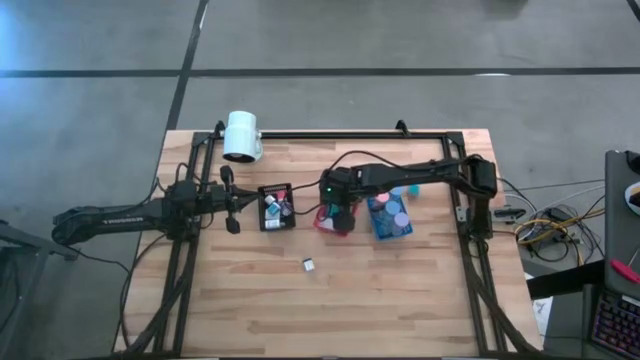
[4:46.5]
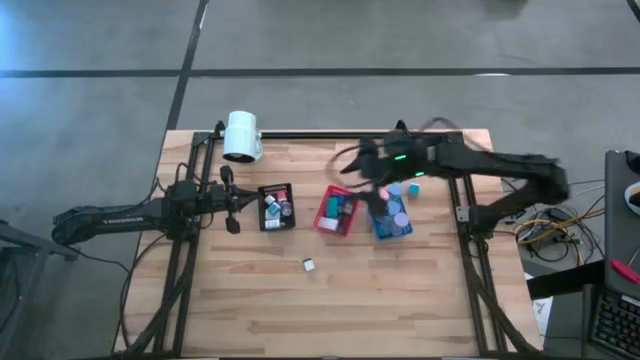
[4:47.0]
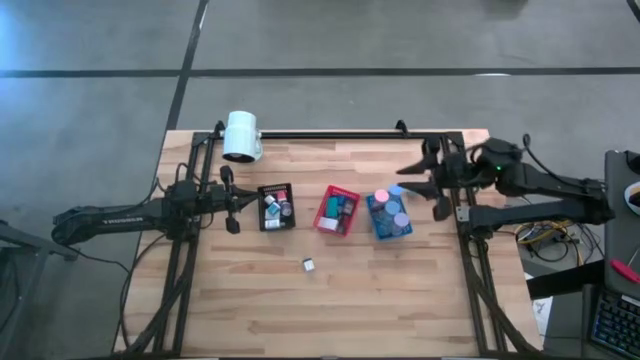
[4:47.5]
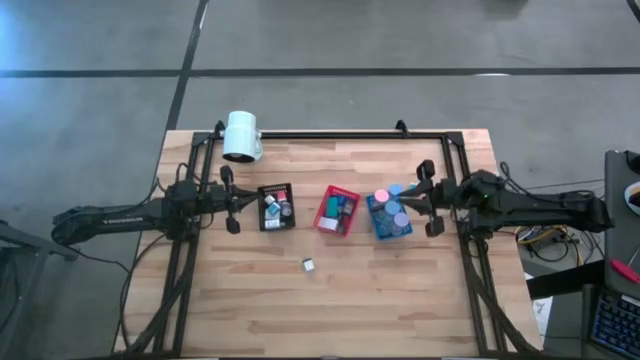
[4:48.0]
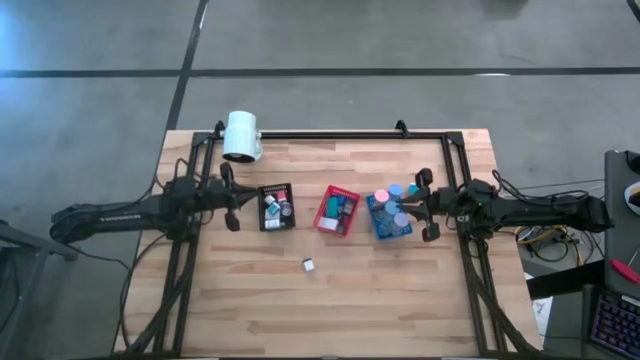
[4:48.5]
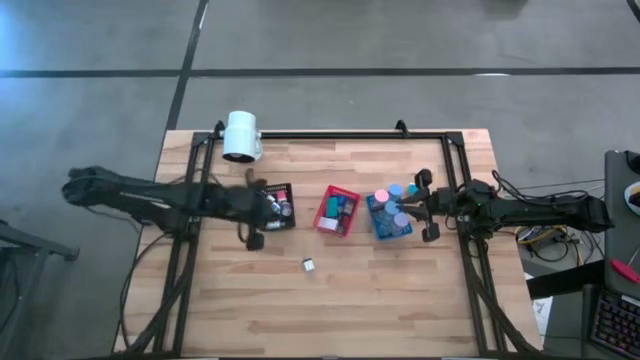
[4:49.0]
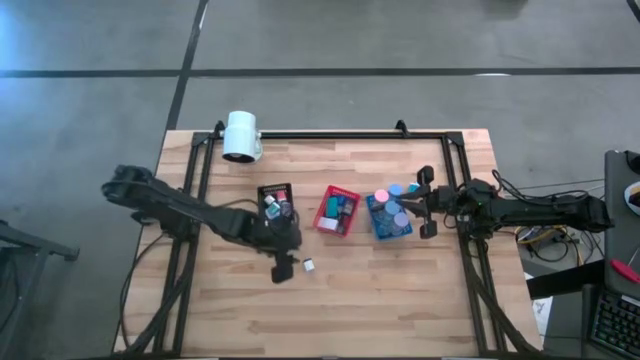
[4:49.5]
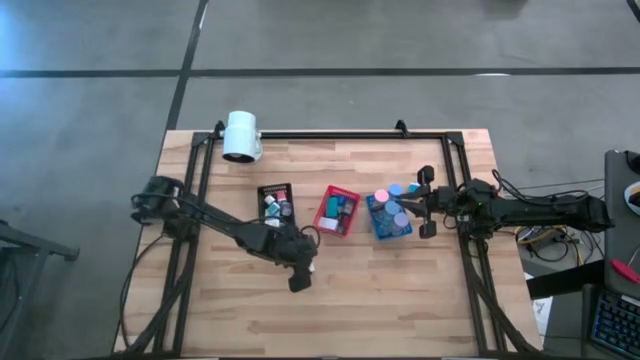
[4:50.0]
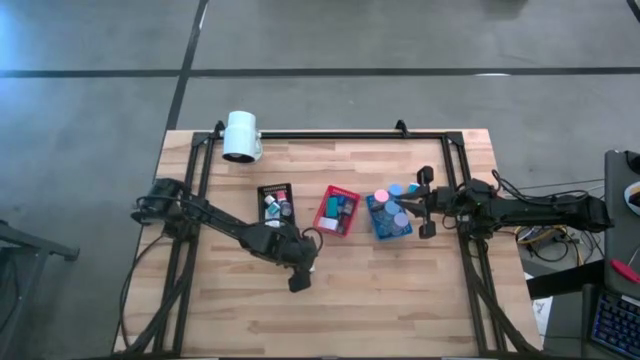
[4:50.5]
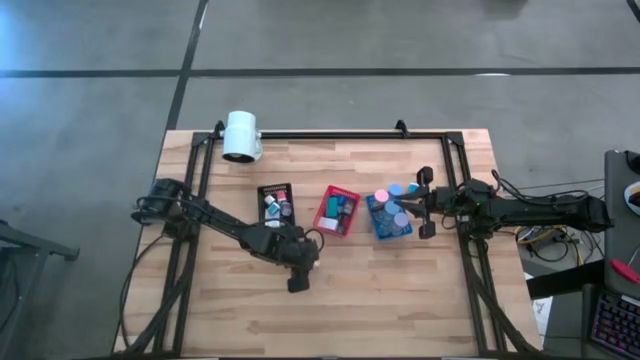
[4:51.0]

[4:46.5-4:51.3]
Task: Pick & Place Office items
Put the black charger adapter into the black bin

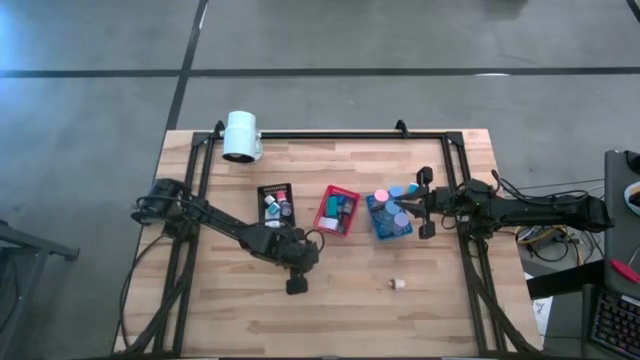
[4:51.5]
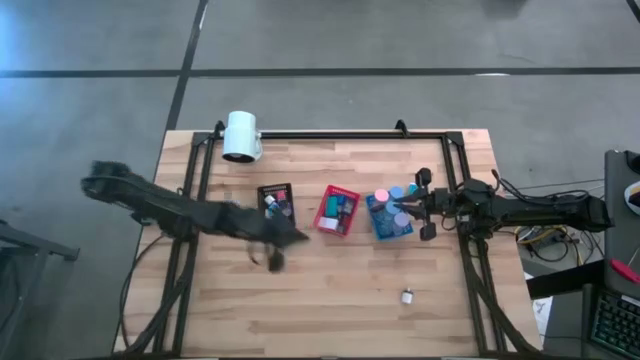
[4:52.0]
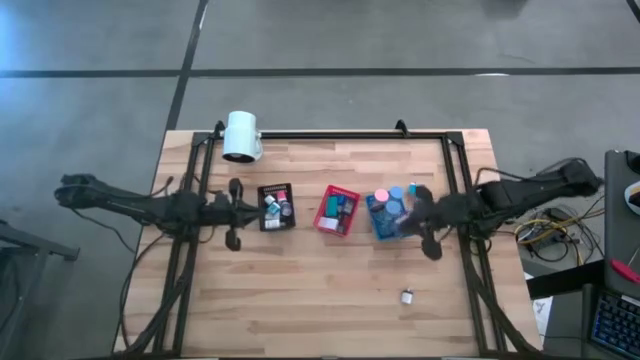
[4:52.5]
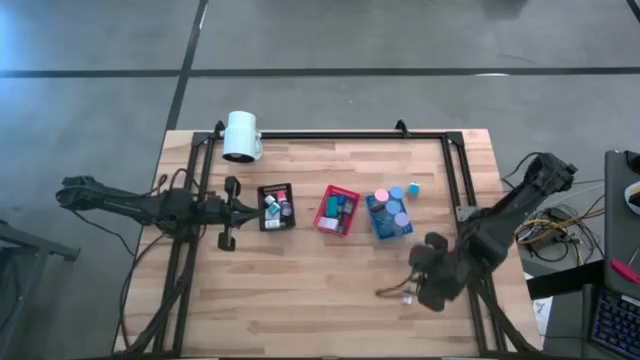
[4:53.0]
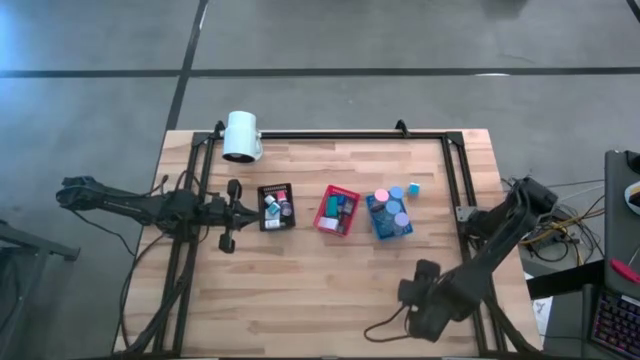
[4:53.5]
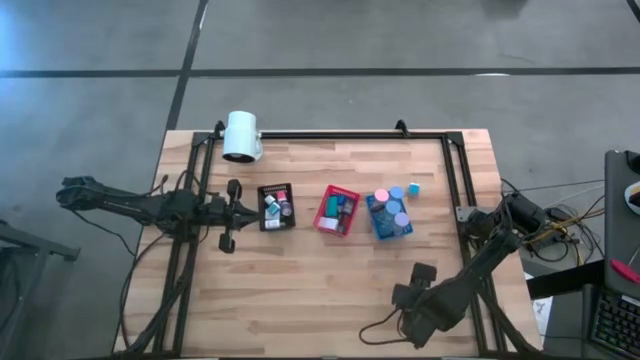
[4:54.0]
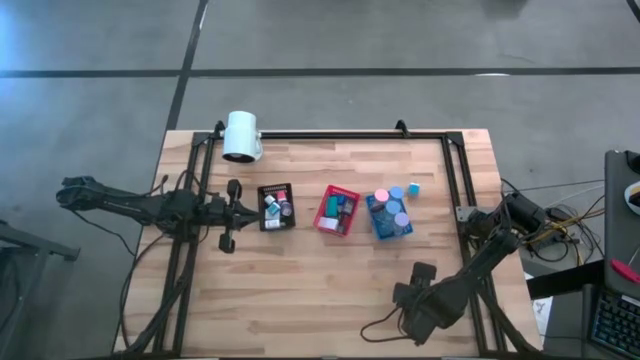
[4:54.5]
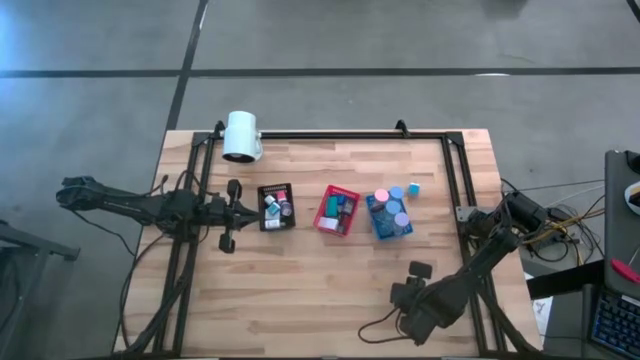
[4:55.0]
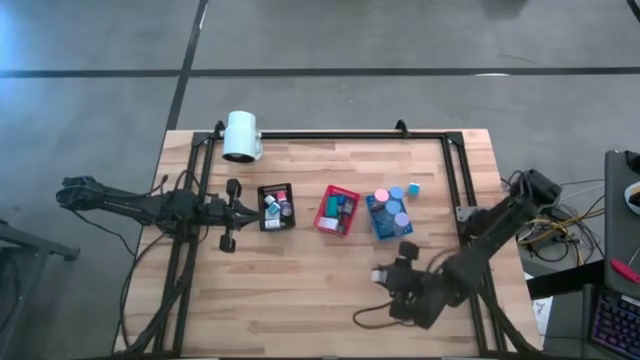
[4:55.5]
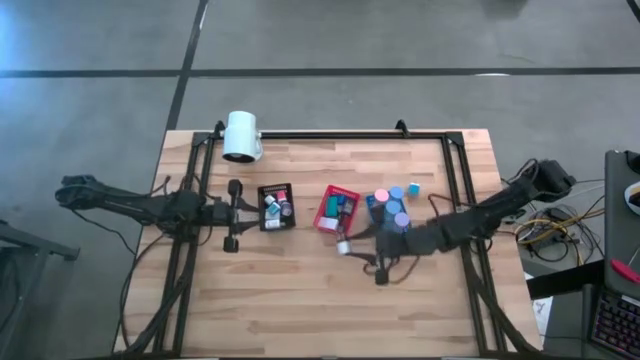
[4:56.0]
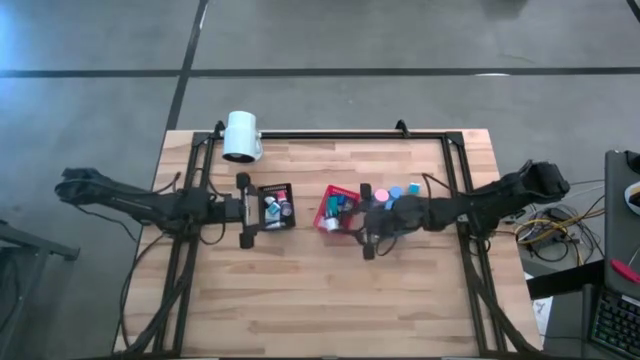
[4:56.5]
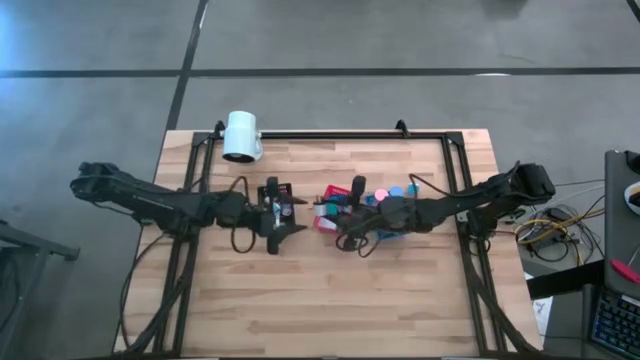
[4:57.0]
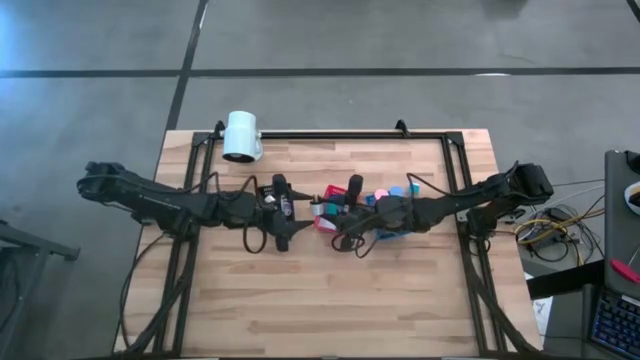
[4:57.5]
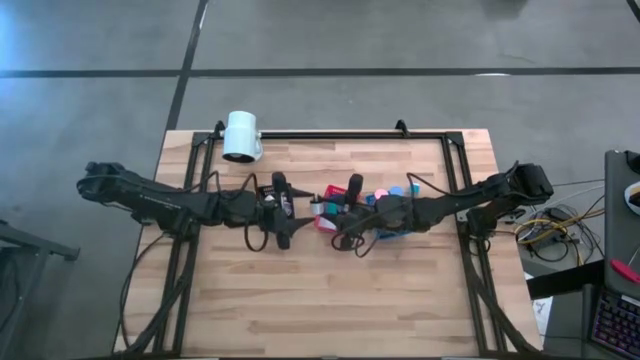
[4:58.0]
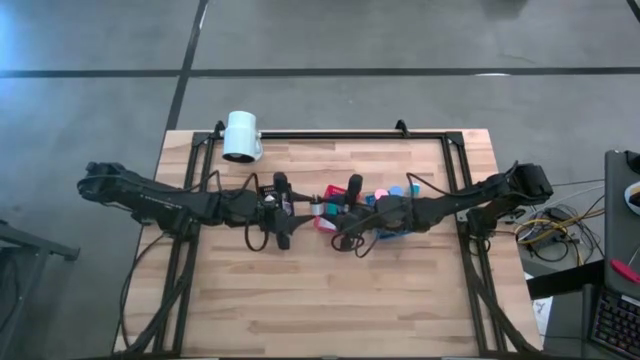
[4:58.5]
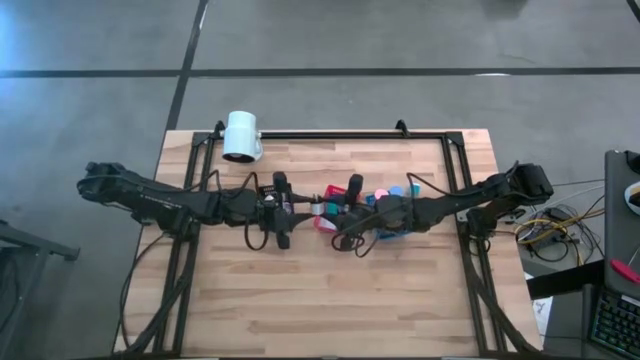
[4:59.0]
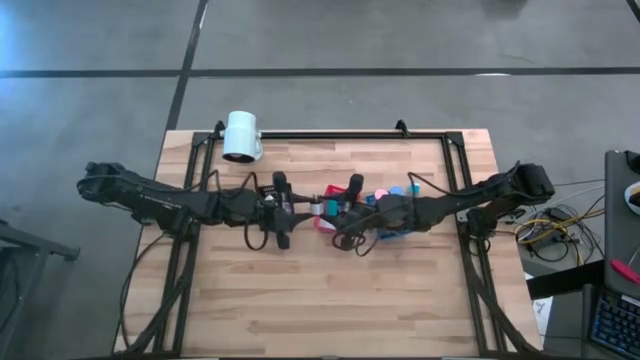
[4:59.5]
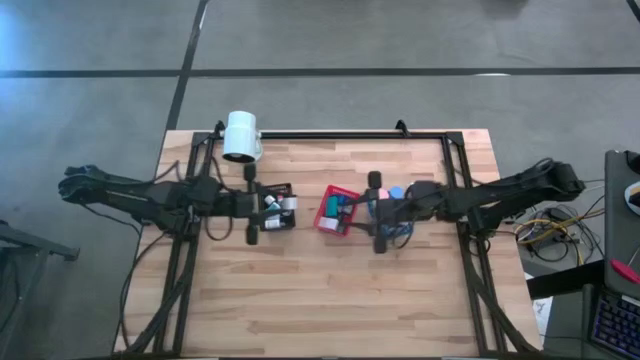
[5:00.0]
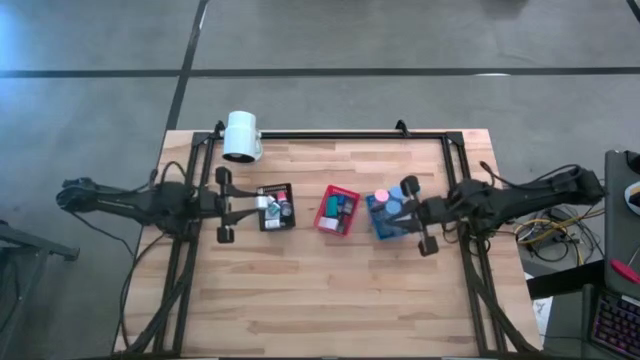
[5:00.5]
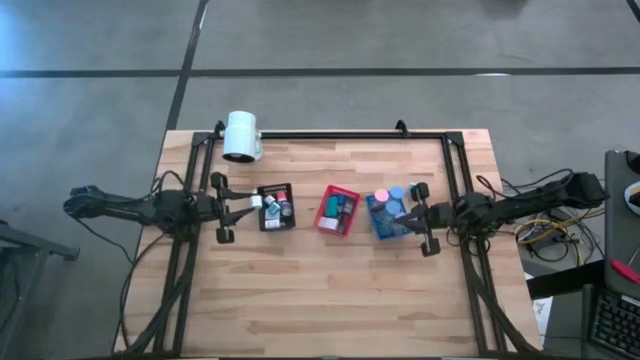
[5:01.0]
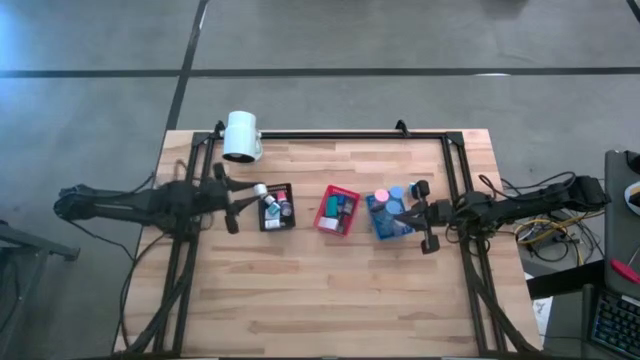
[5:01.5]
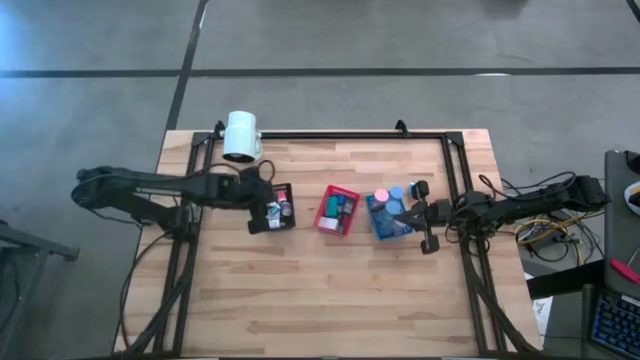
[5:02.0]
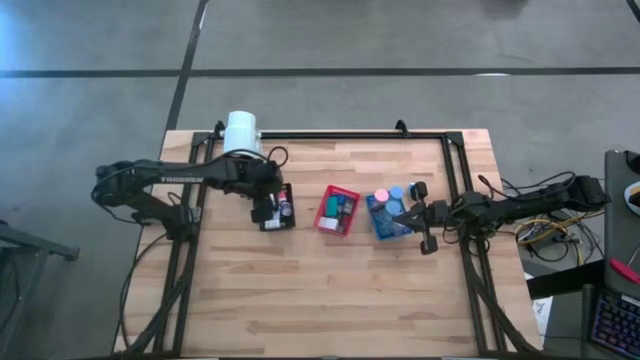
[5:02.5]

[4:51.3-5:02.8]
Put the white and black charger adapter into the black bin

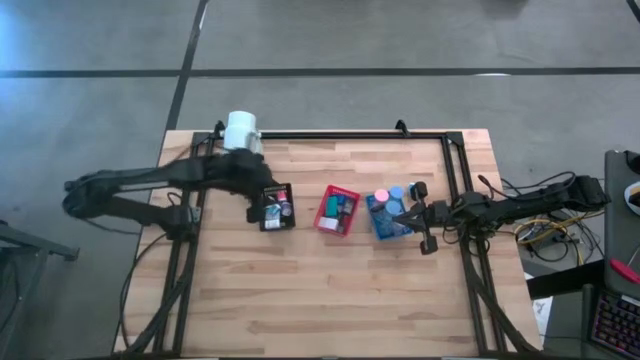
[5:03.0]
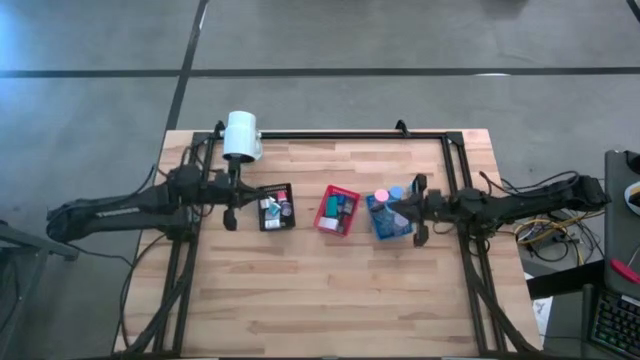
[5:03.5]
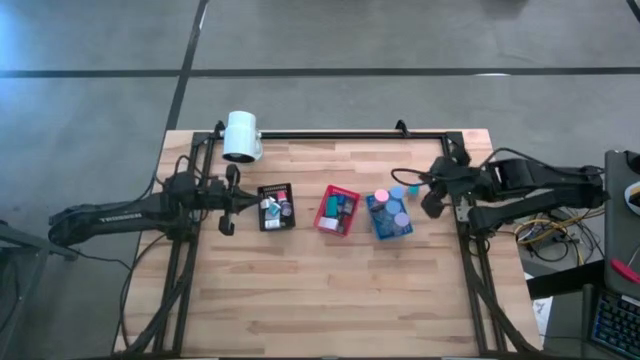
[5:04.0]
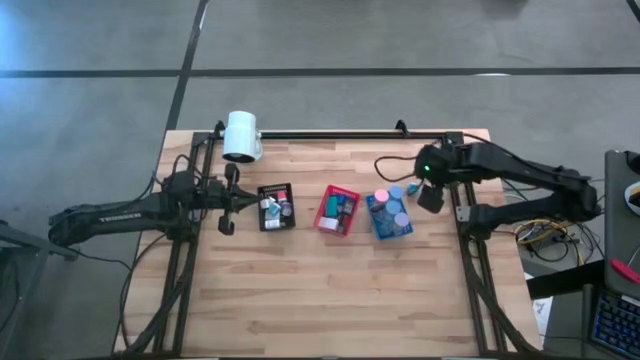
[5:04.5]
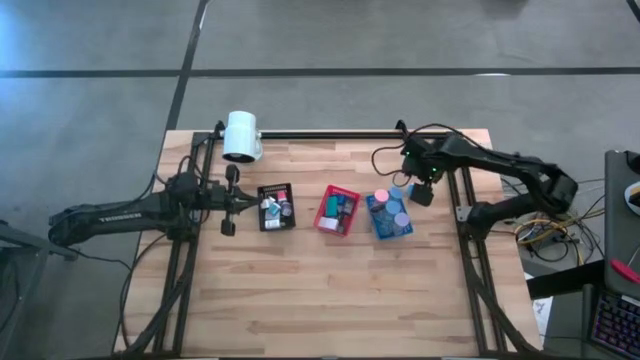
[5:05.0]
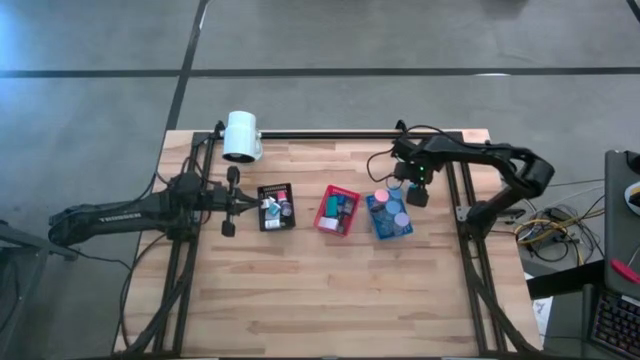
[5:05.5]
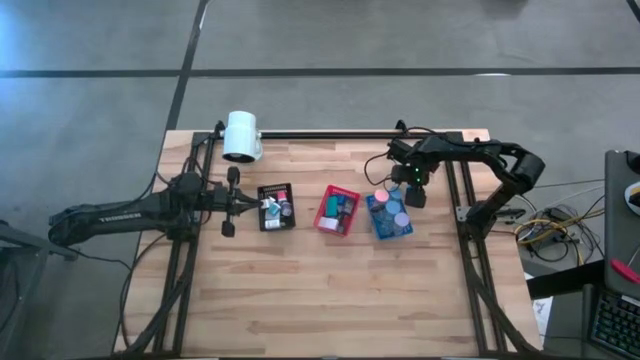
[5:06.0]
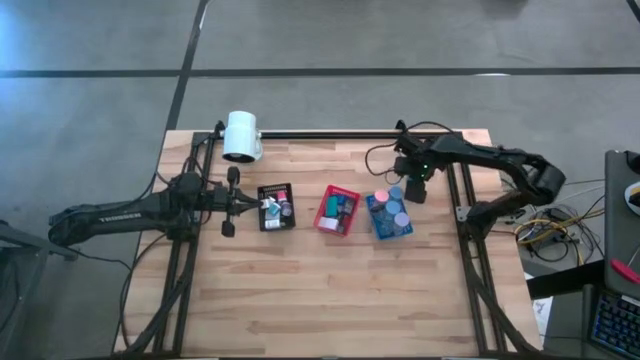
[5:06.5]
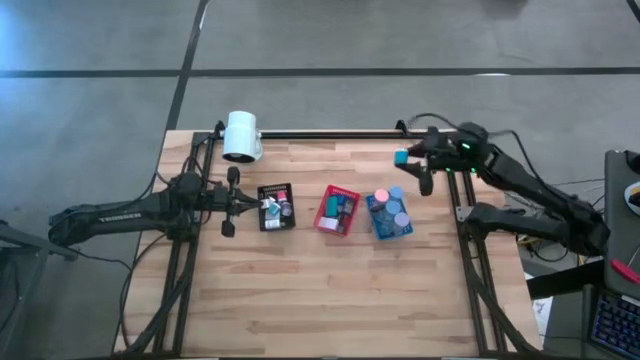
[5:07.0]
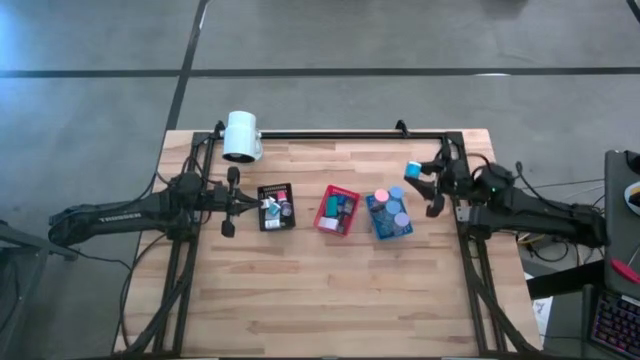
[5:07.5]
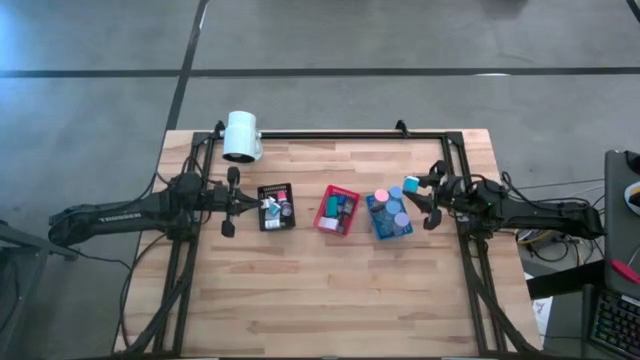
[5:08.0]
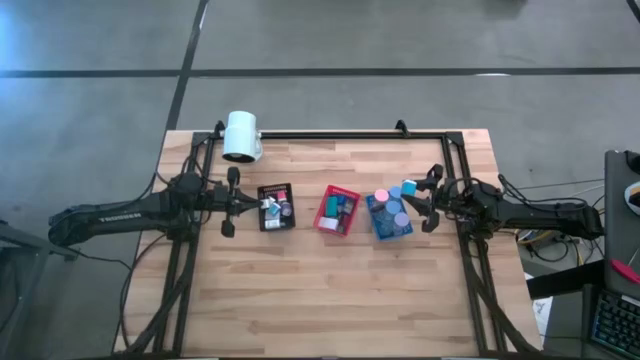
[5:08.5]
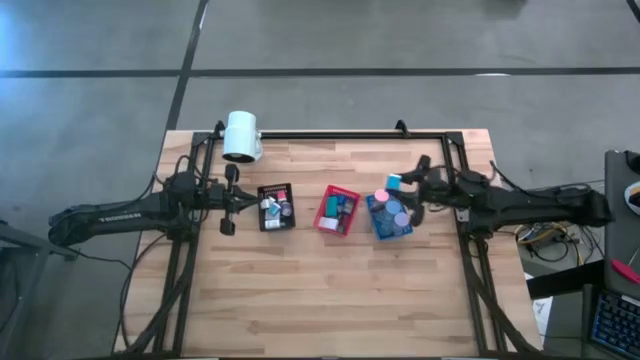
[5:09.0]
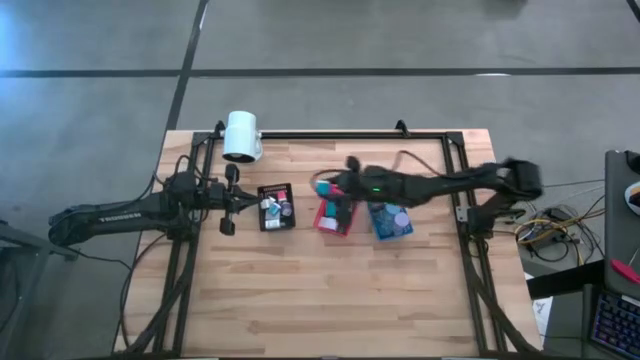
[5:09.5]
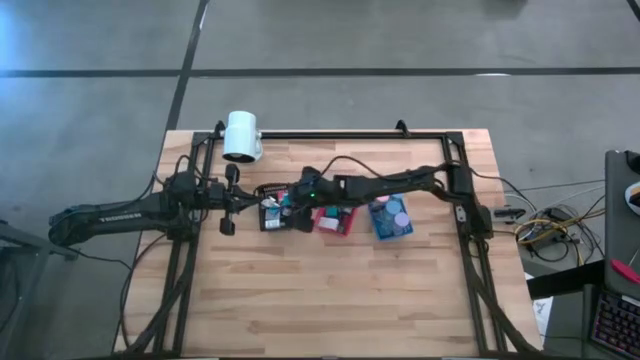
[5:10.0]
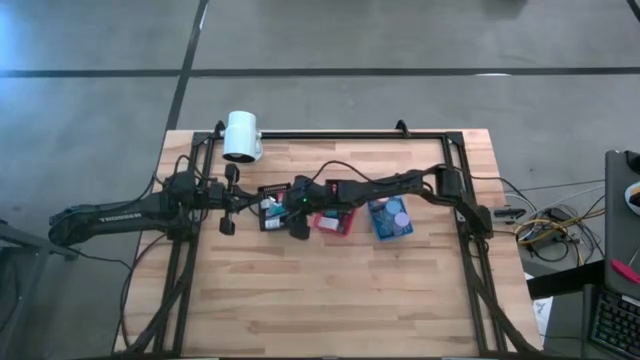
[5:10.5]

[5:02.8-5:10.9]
Put the blue charger adapter into the black bin
